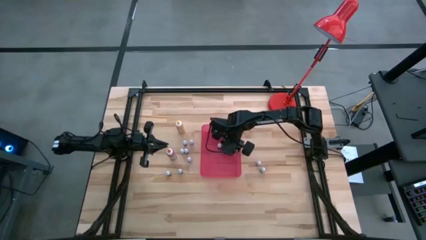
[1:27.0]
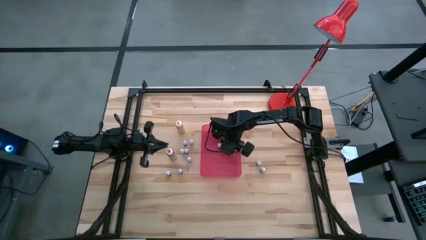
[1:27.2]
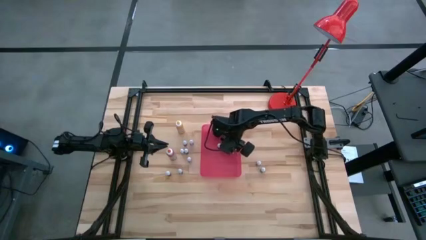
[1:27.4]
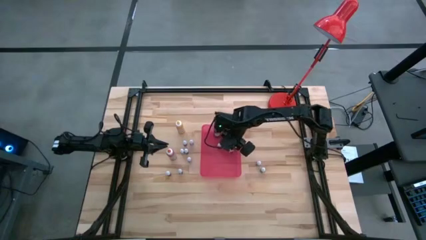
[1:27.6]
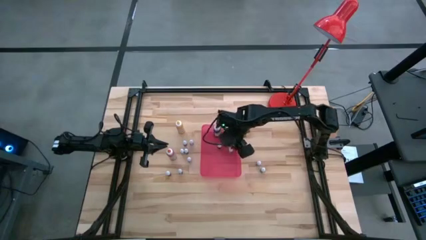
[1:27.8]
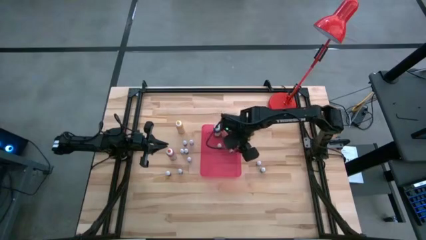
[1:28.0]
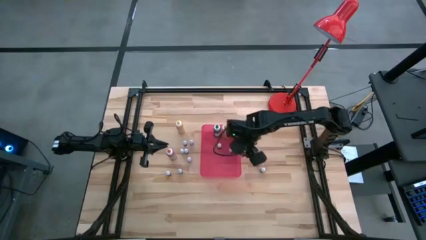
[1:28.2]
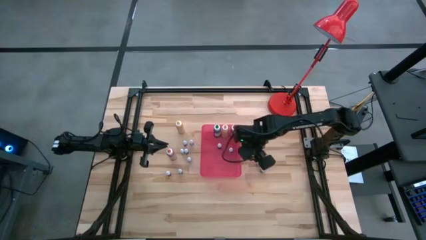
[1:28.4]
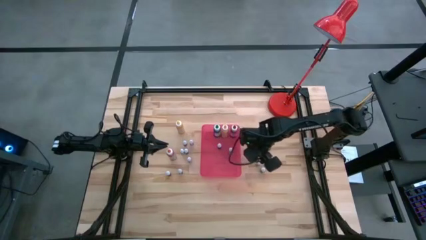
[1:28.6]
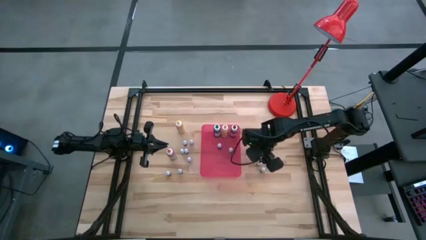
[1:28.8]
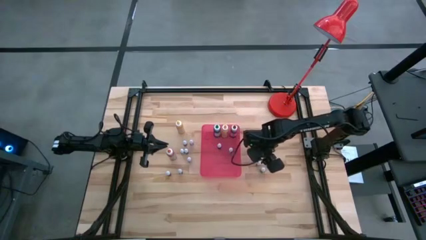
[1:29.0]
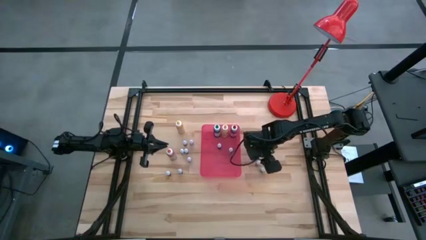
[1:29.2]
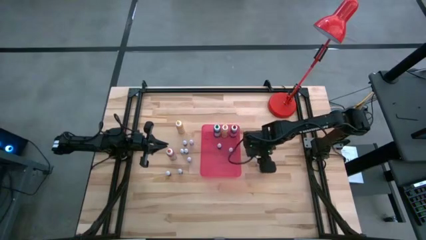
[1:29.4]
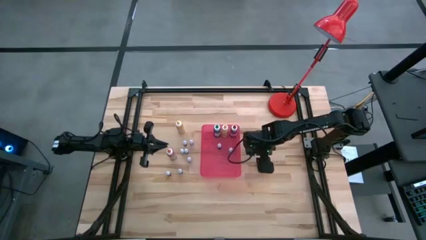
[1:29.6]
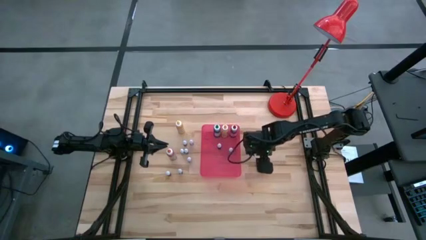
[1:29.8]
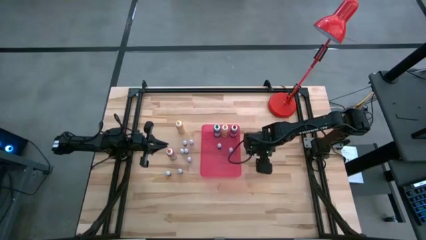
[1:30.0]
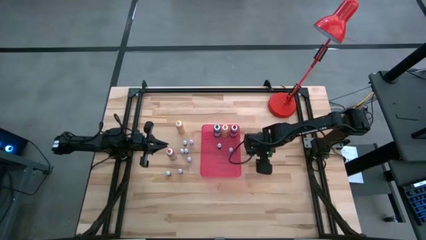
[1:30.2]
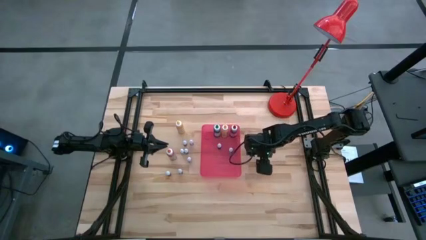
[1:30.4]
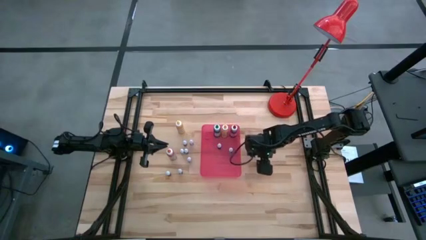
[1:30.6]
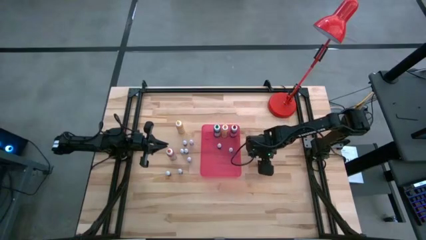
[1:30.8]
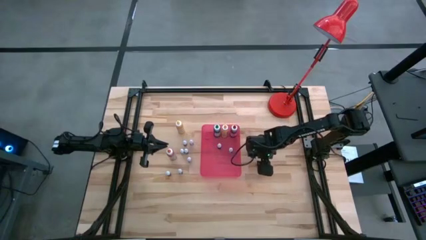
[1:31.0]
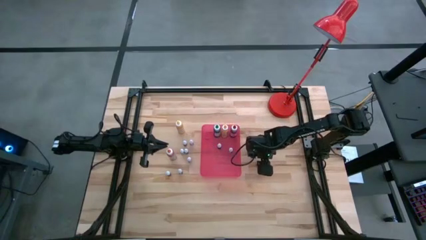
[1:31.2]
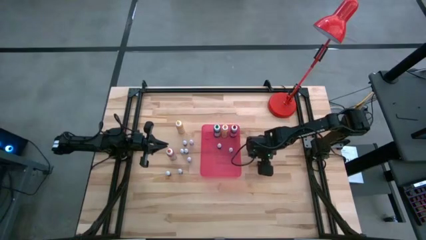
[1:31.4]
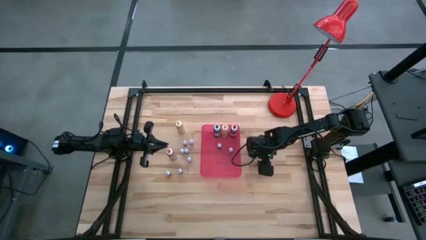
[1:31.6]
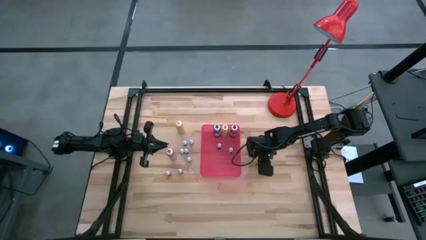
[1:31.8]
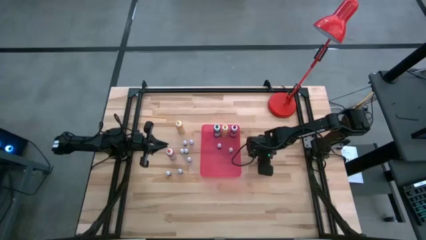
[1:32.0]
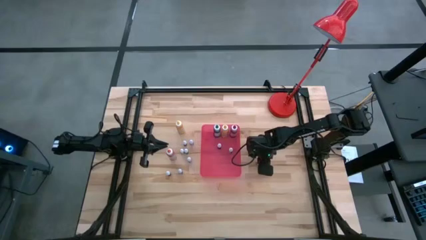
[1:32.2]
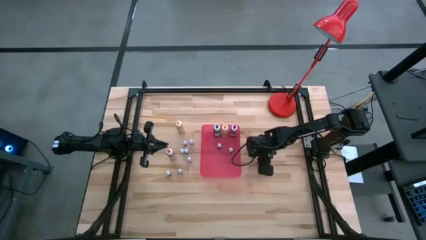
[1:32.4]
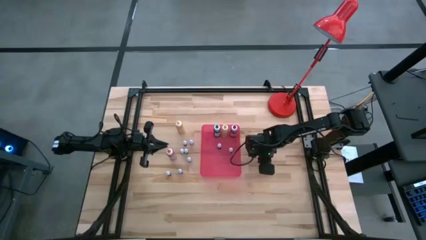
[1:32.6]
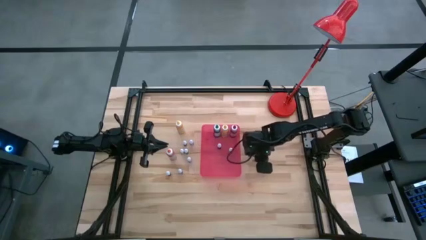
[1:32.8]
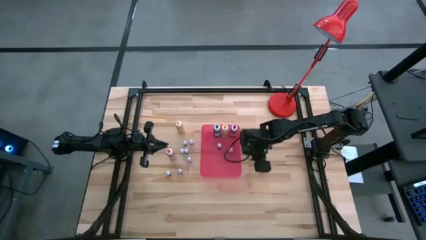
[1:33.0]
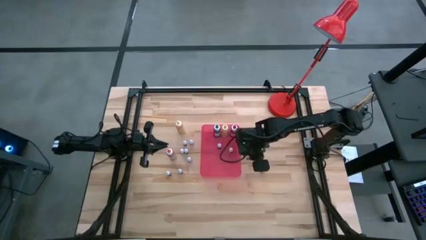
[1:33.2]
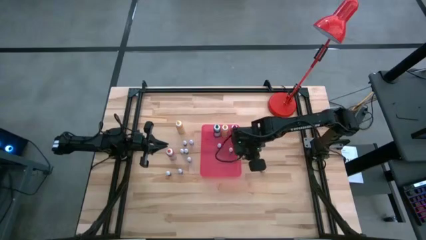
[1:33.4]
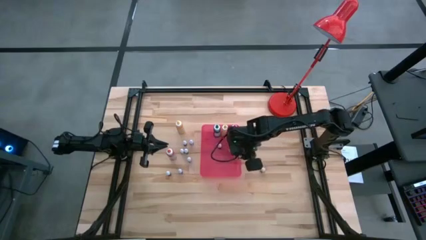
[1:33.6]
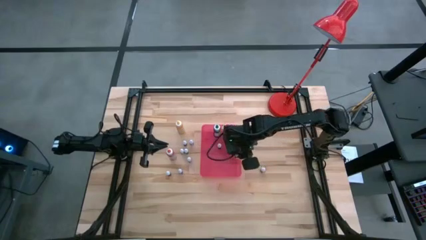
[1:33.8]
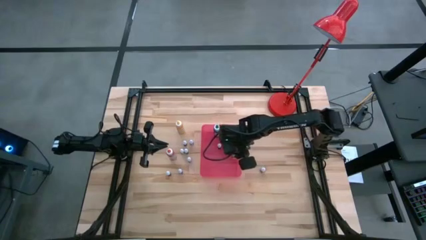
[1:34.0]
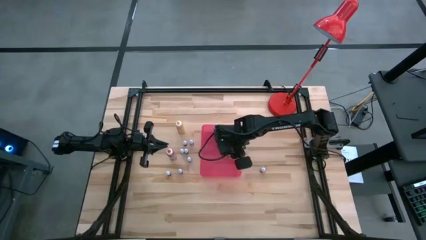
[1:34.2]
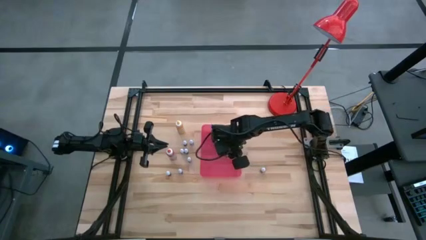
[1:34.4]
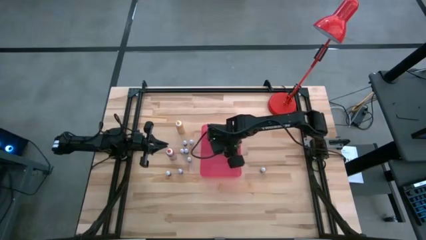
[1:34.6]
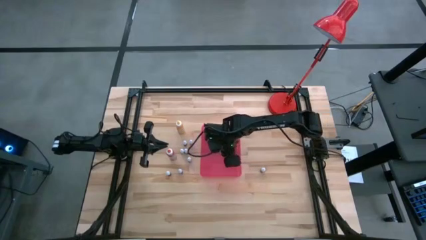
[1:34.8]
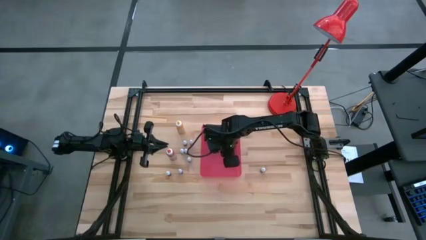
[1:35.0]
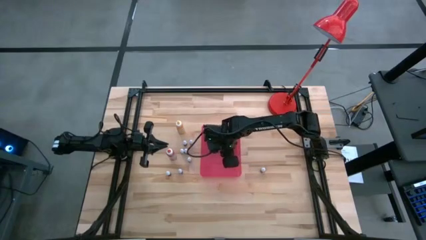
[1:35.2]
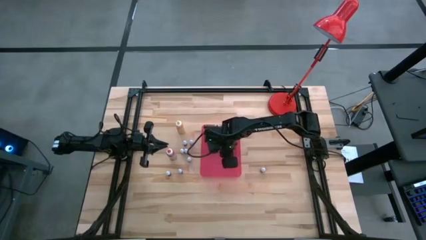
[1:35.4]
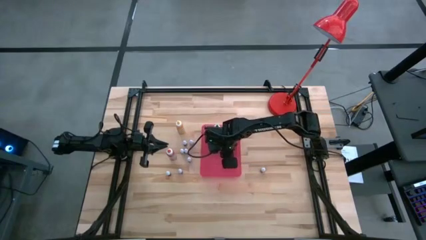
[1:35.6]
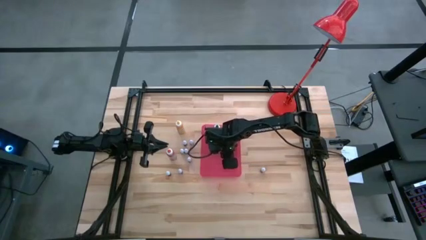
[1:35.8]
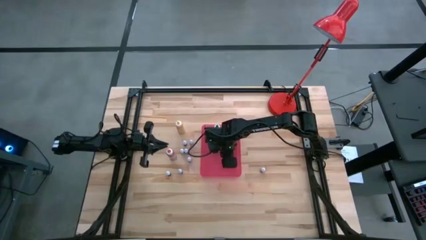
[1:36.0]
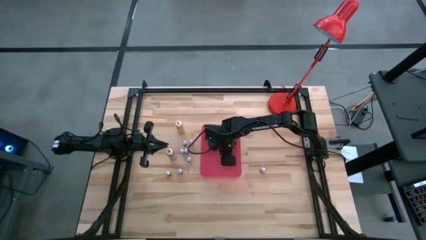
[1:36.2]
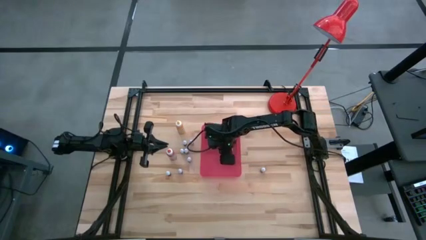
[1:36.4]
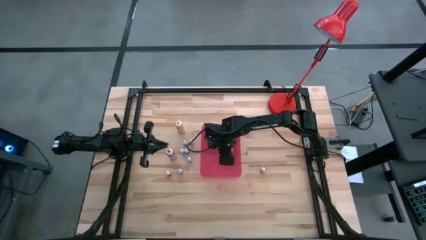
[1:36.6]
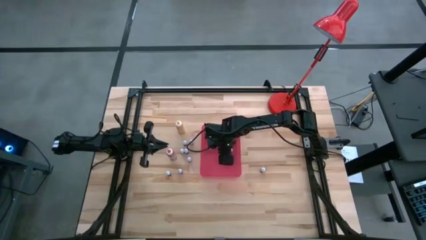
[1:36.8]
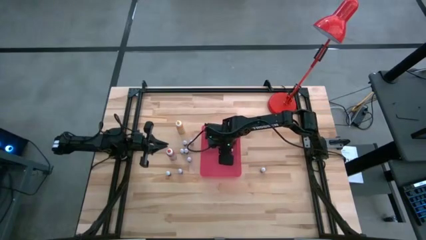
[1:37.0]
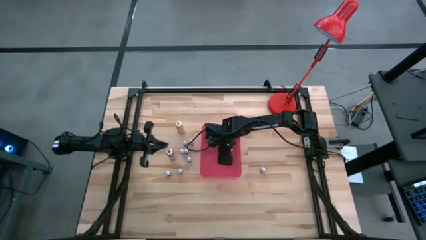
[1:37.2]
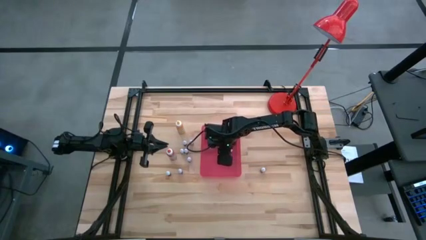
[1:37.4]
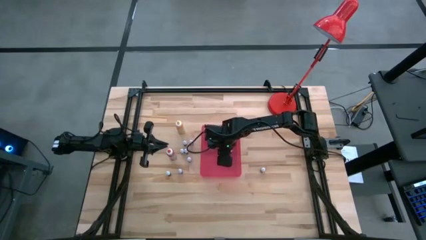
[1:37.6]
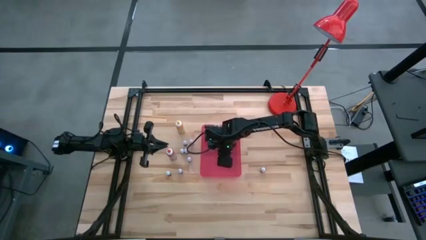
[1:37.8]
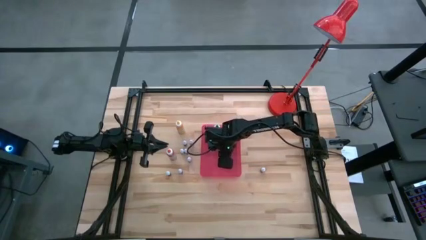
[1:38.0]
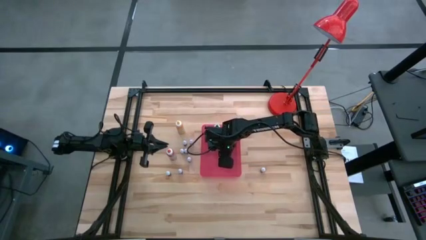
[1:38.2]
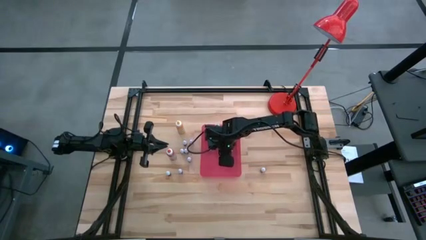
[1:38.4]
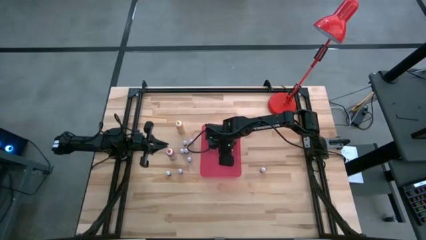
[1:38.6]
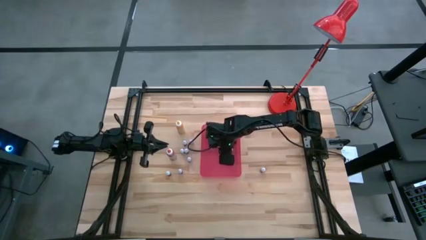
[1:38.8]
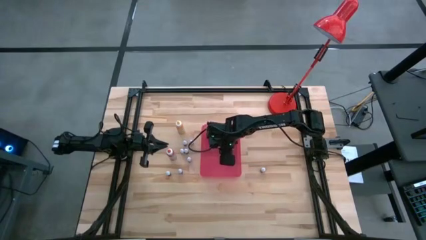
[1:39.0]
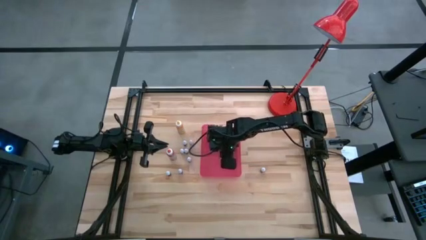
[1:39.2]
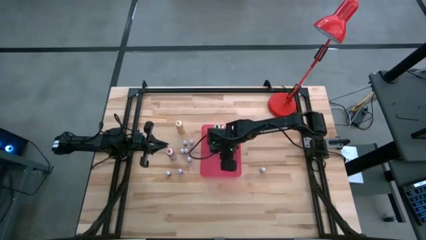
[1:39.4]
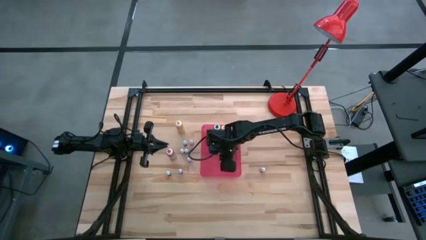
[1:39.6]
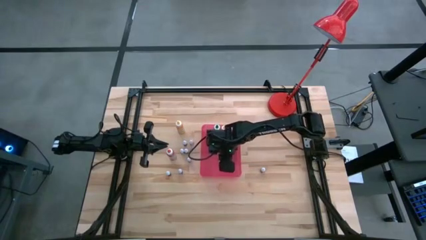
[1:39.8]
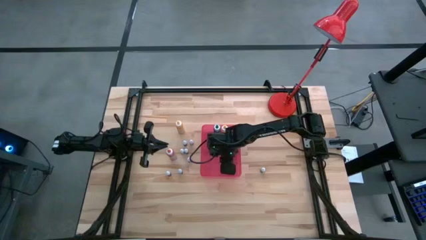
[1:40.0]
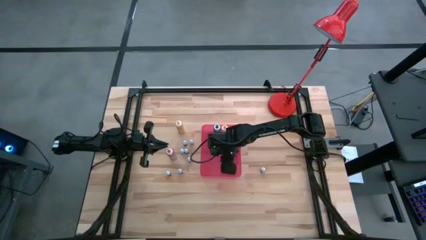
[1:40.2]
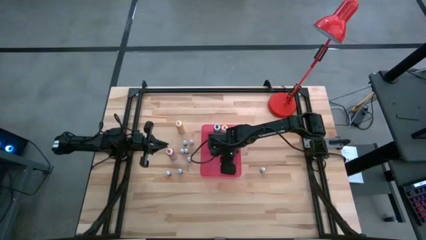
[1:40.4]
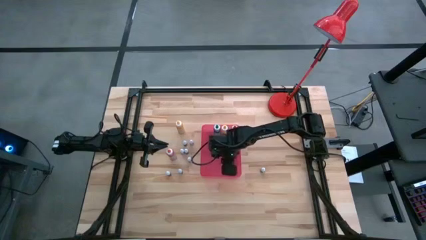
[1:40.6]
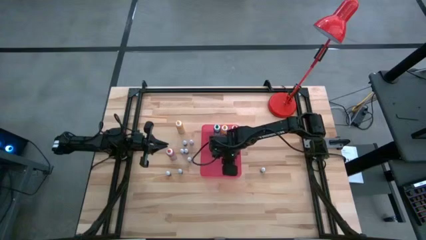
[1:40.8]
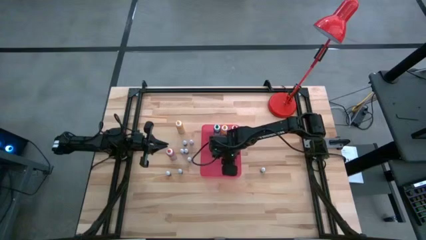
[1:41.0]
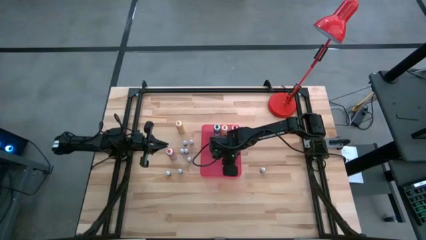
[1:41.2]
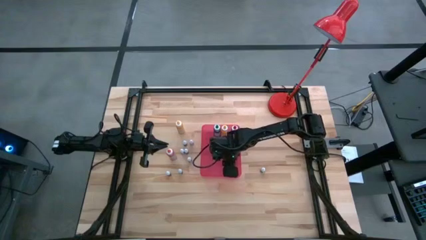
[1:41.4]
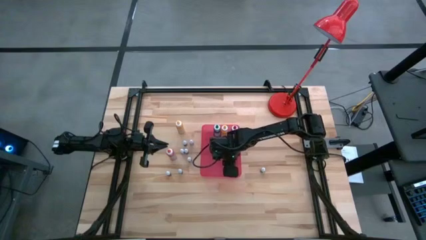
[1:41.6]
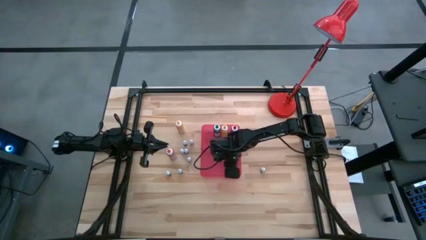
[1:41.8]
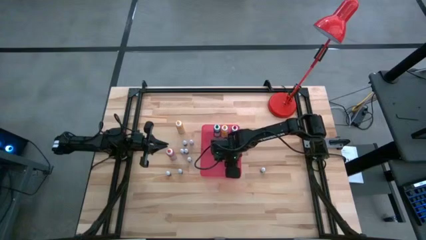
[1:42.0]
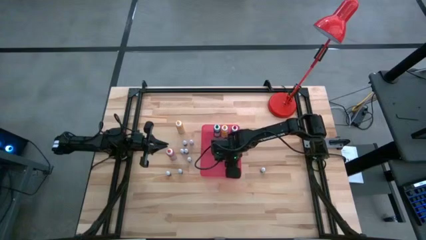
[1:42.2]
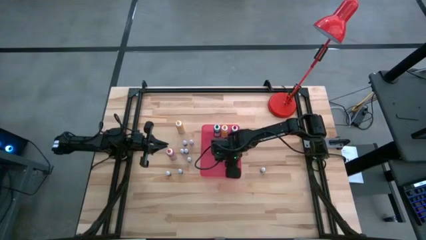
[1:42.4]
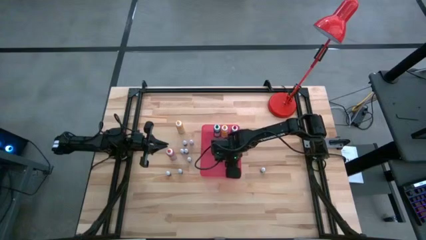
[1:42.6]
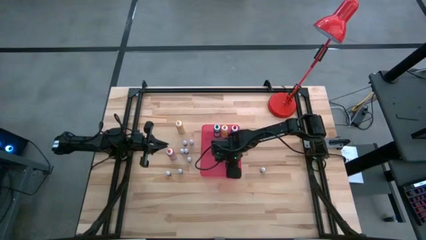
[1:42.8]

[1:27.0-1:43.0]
Task: Pick & Place food coloring
Put the small food coloring bottle into the red bin

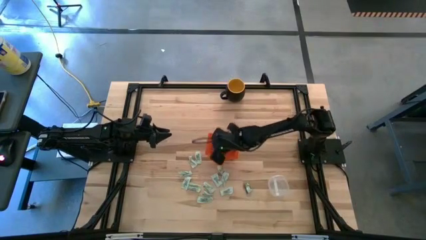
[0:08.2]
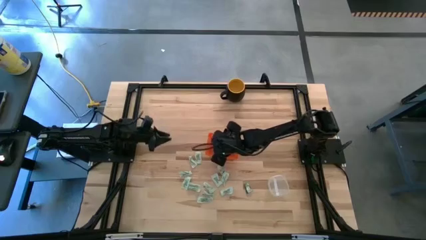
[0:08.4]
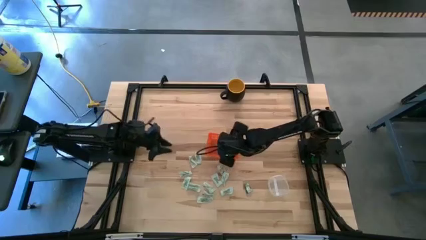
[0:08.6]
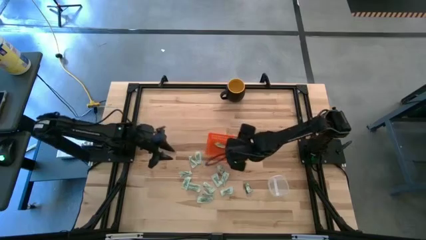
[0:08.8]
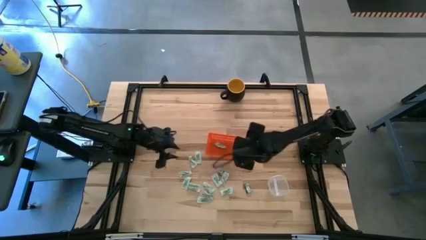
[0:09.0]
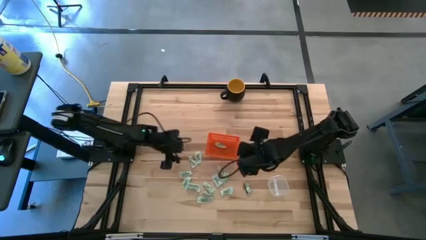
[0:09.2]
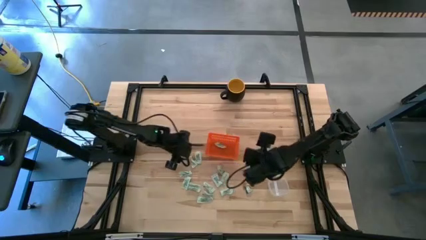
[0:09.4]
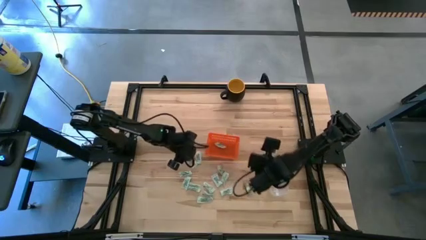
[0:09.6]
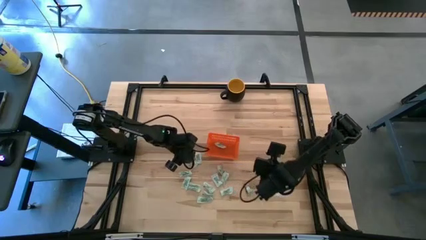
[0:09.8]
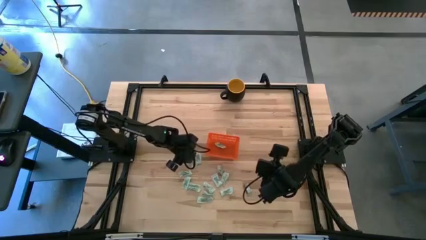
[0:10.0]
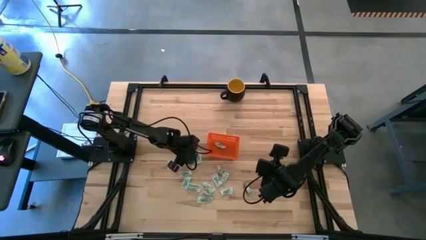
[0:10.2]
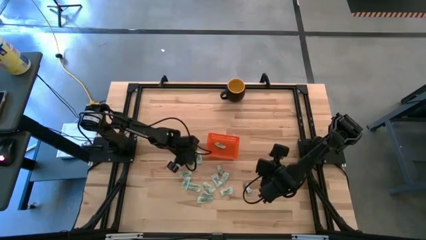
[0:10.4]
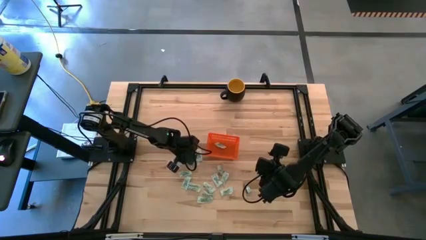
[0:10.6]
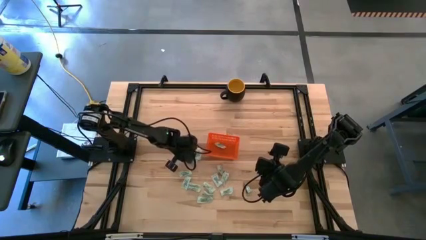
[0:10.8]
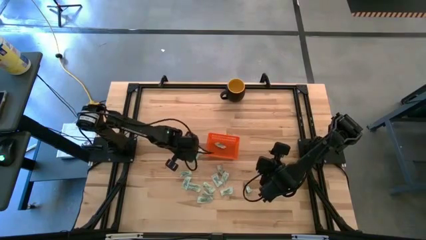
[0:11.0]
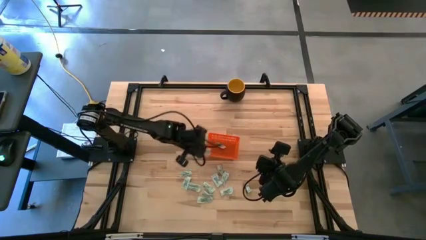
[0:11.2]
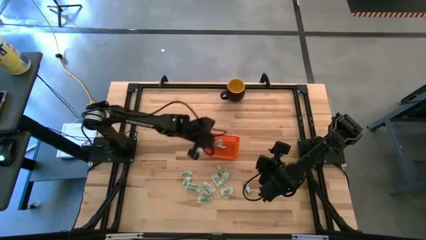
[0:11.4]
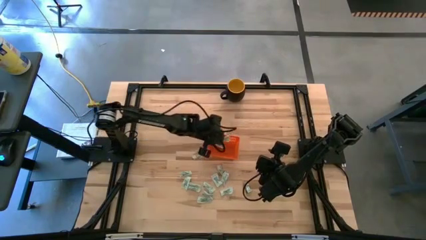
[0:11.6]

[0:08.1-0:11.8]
Task: Pick and place items into bin
Put the light green stevia packet into the orange bin
